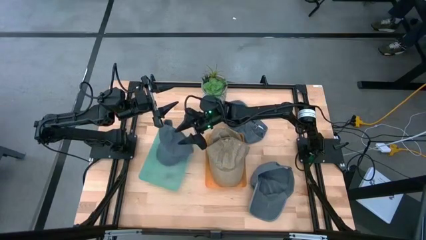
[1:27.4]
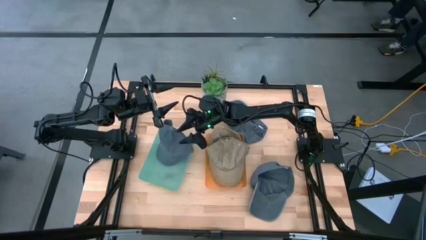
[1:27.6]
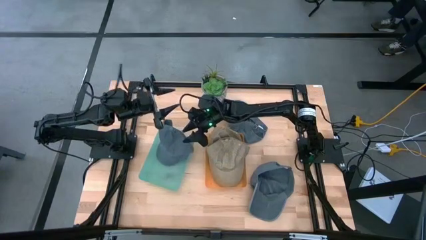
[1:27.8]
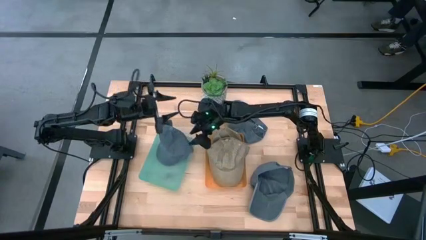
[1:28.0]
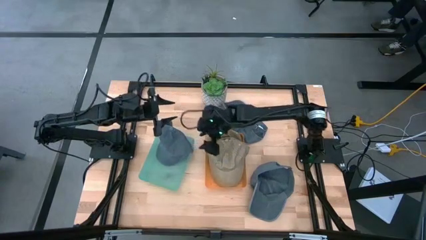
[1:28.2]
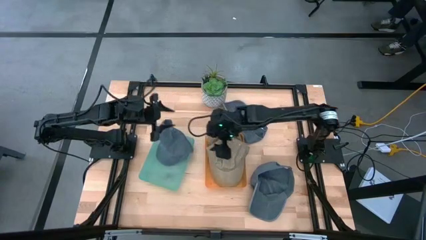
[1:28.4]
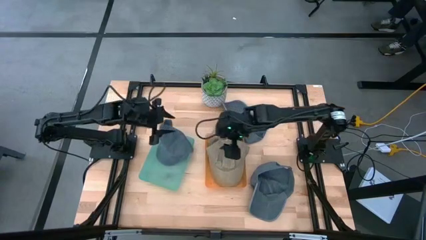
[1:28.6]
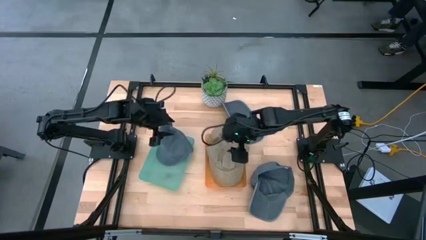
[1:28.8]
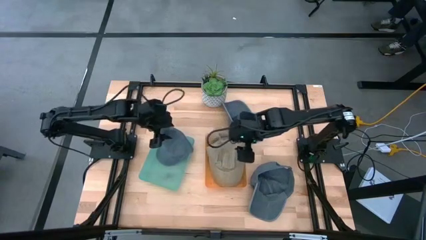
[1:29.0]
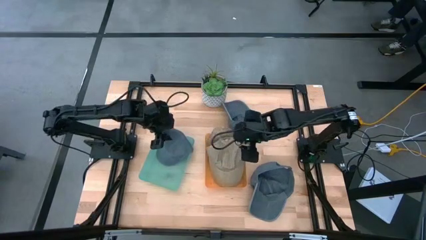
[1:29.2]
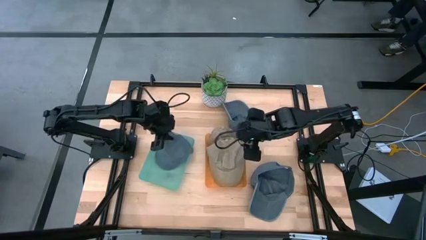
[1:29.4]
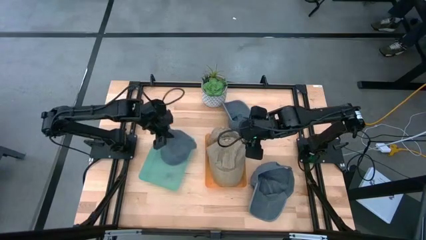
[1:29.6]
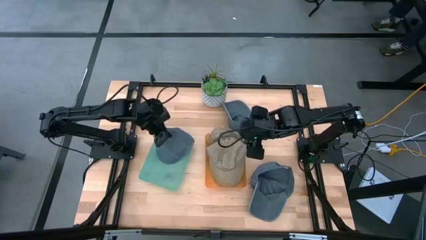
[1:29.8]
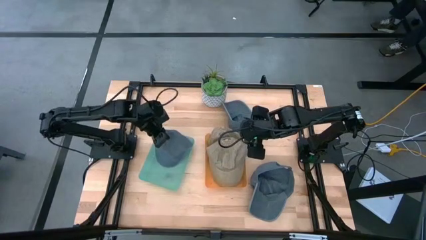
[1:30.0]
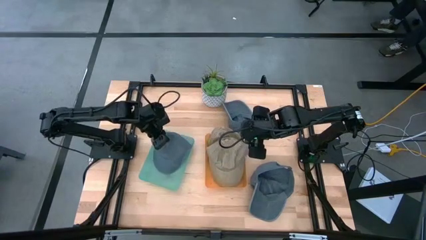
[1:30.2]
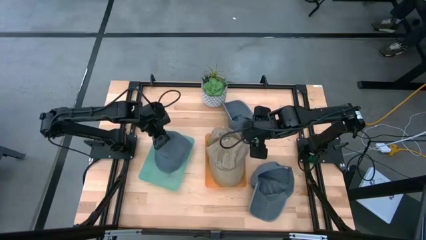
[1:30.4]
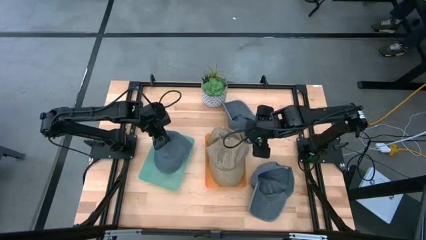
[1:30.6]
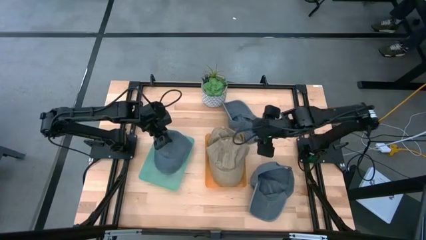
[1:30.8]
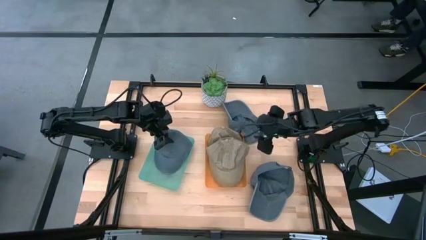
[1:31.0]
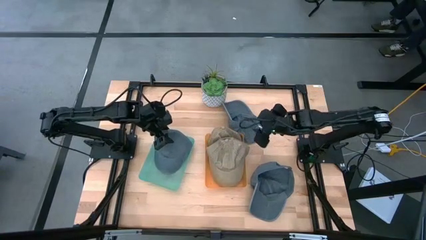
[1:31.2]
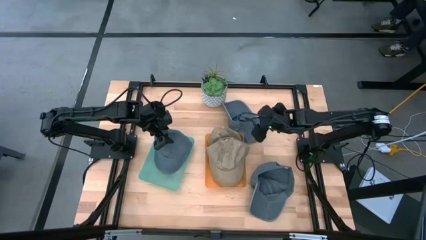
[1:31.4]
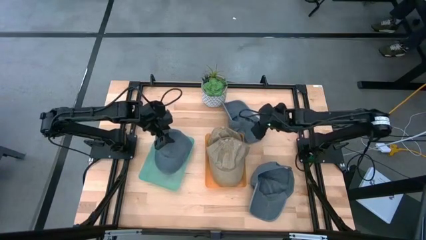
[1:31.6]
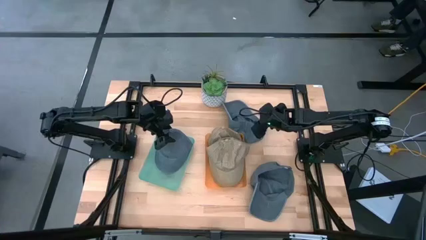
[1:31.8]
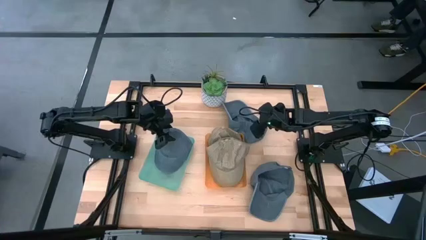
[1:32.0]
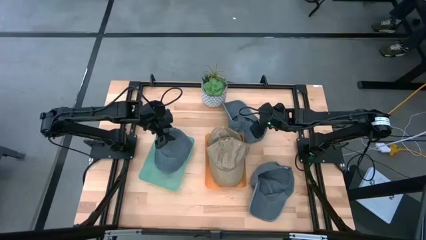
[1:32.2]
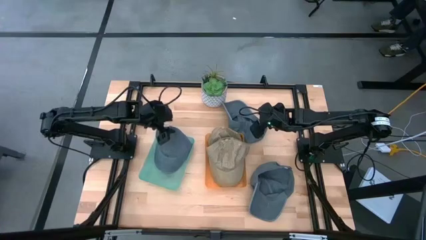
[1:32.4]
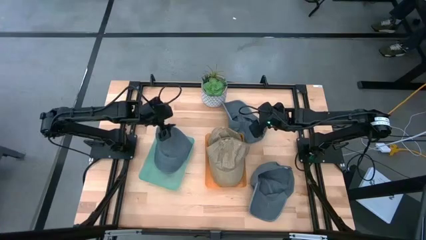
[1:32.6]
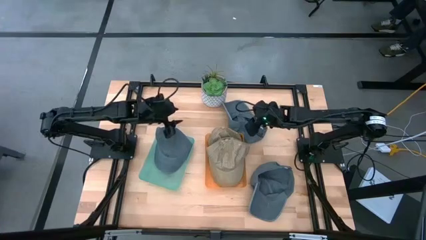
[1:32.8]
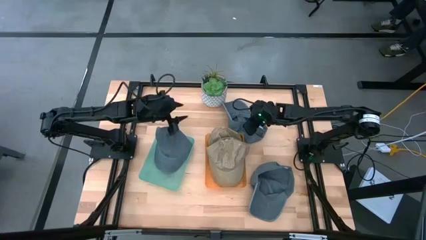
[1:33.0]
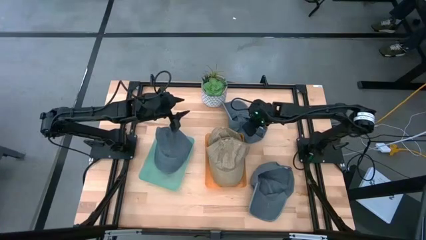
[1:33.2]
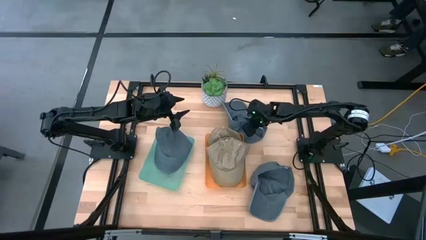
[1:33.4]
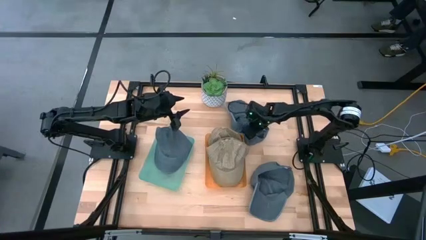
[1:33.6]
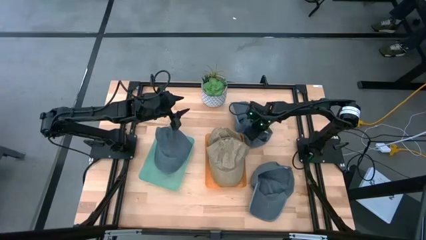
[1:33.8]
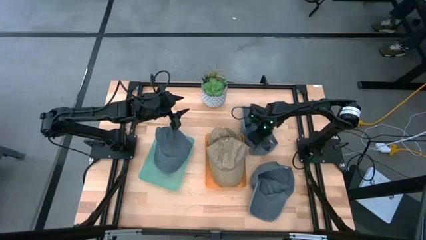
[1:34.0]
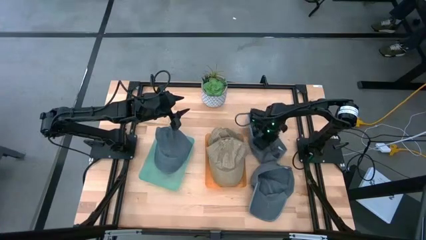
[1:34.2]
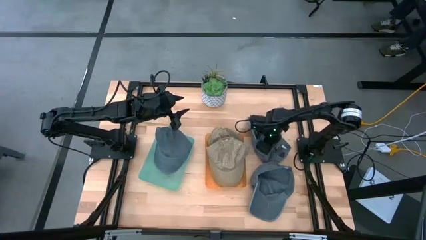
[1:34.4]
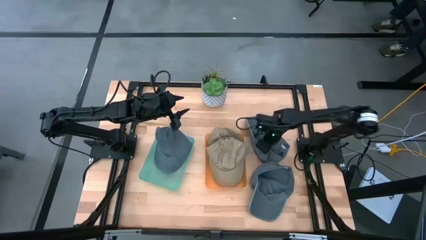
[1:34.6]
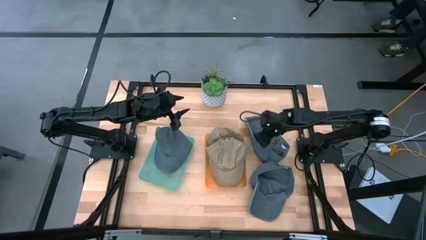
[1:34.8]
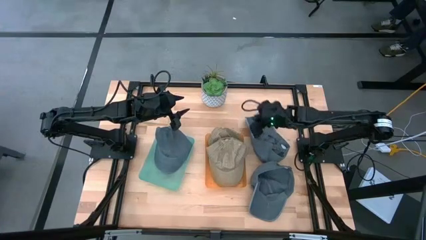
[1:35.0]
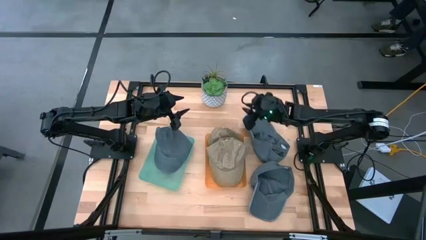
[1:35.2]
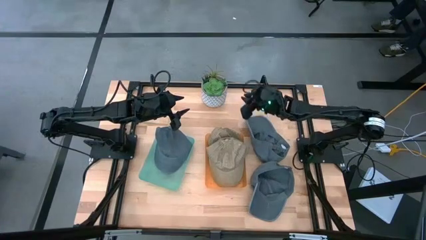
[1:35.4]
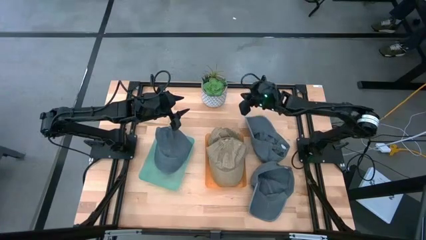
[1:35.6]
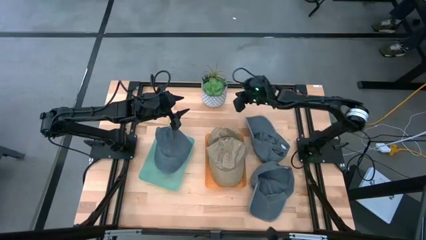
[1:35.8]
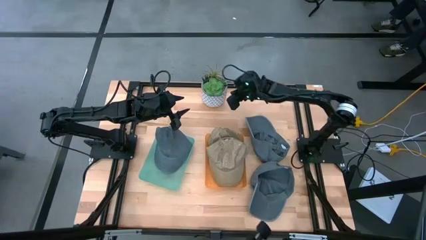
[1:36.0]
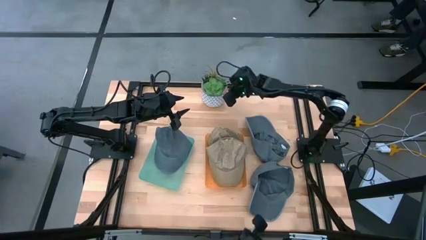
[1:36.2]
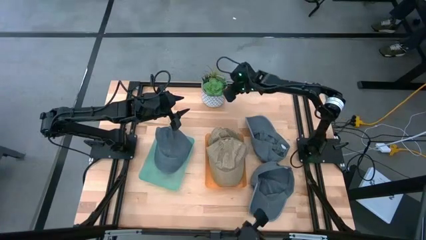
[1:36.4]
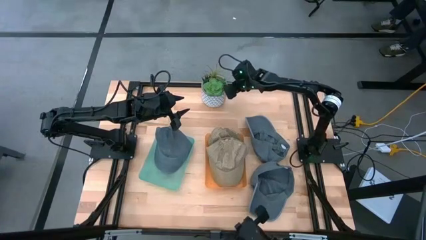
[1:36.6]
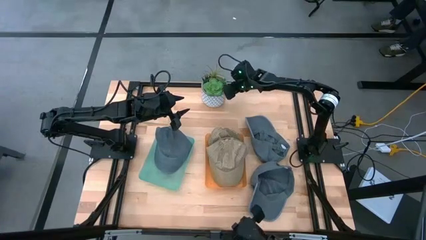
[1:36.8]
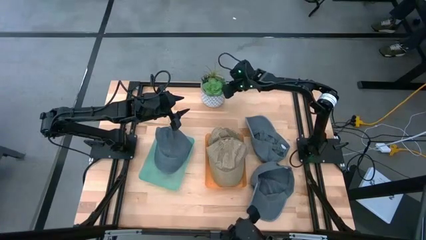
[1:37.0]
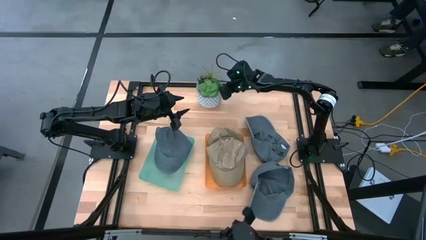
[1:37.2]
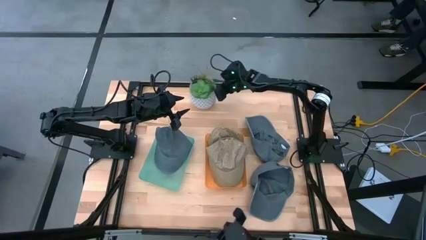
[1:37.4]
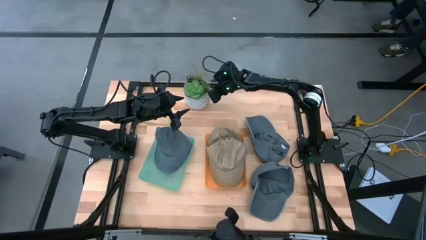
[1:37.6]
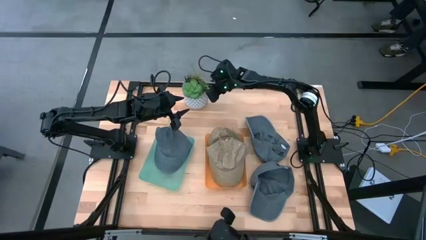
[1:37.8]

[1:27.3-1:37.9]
Task: Pick & Place hat
Adjust the vase on the table

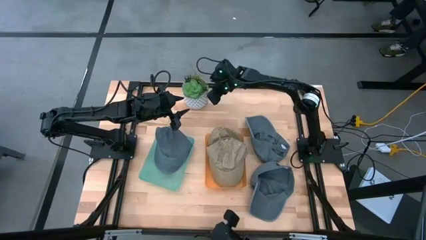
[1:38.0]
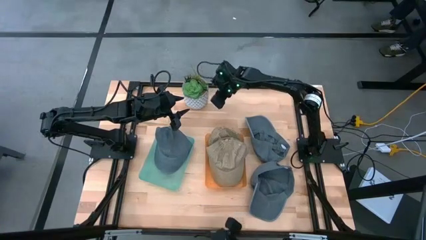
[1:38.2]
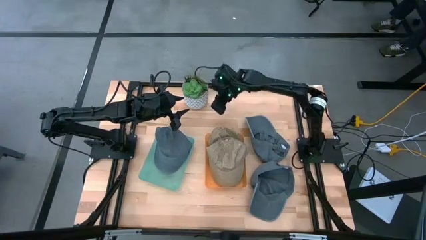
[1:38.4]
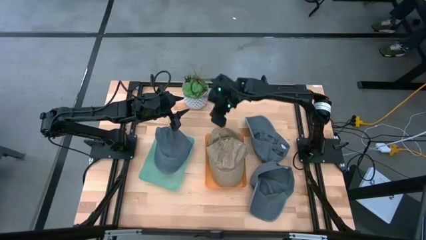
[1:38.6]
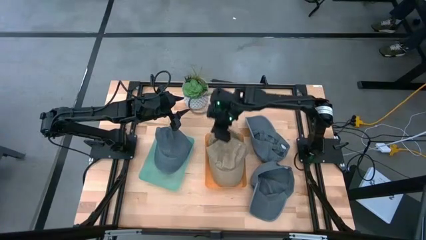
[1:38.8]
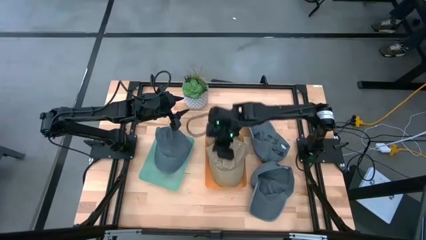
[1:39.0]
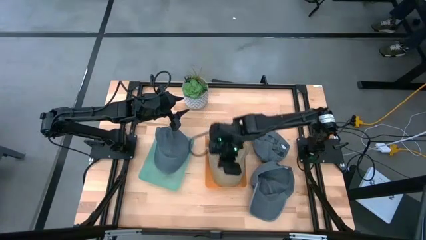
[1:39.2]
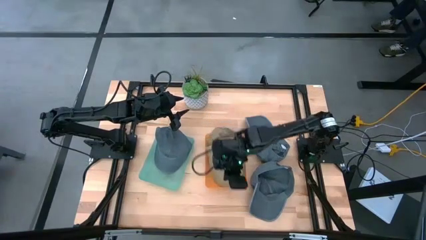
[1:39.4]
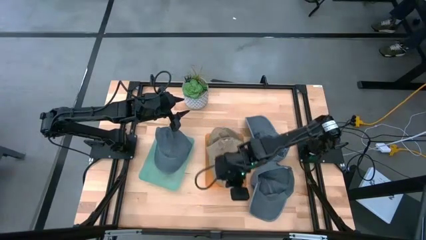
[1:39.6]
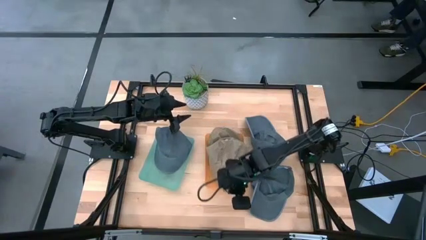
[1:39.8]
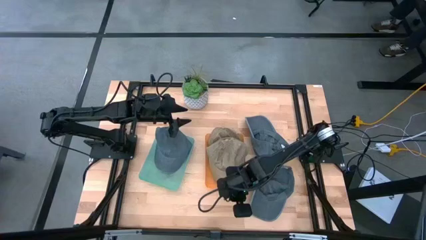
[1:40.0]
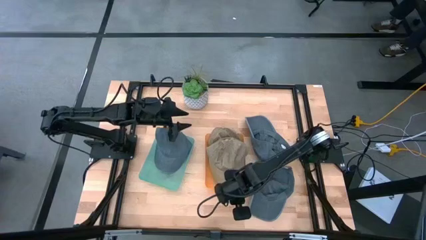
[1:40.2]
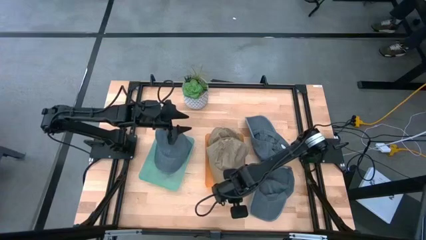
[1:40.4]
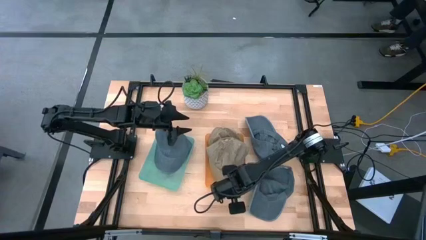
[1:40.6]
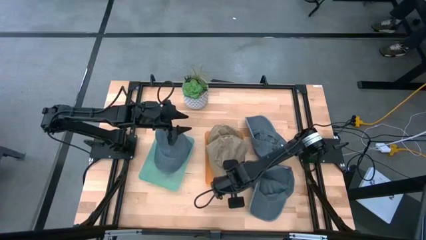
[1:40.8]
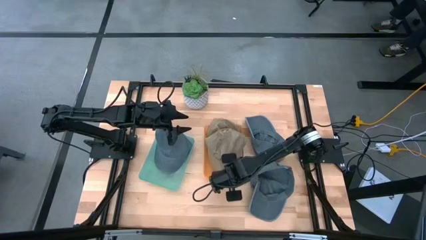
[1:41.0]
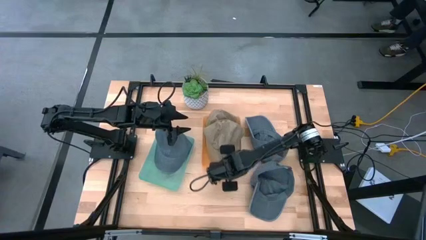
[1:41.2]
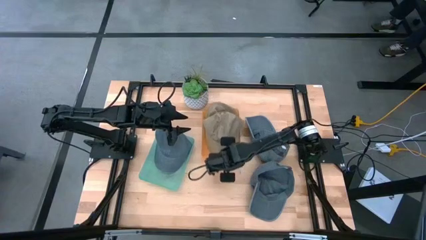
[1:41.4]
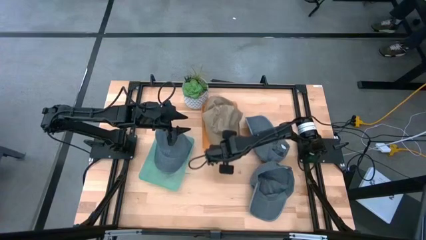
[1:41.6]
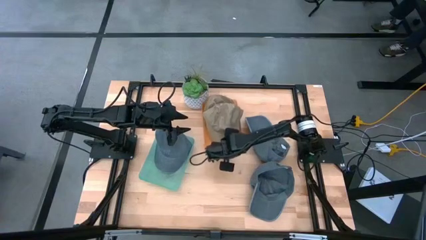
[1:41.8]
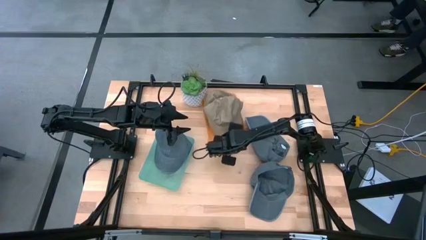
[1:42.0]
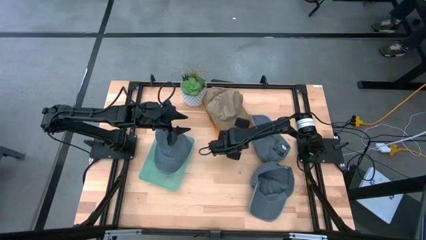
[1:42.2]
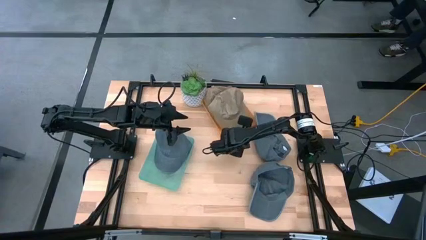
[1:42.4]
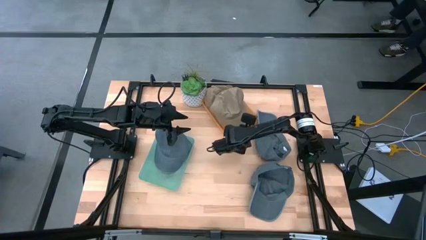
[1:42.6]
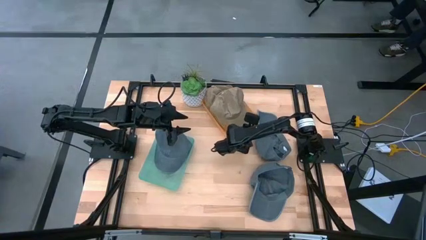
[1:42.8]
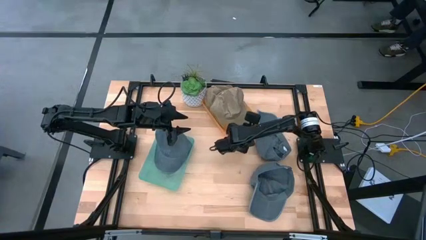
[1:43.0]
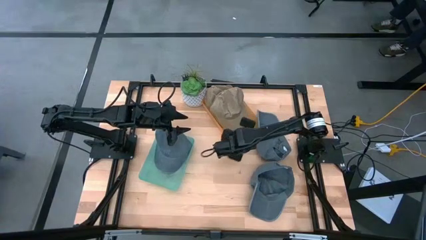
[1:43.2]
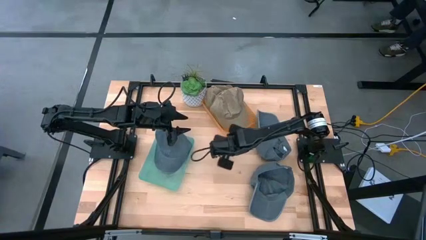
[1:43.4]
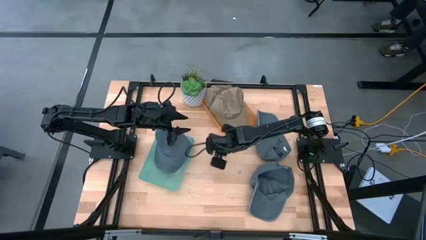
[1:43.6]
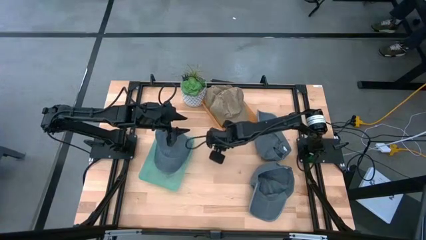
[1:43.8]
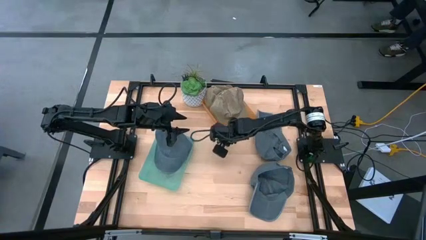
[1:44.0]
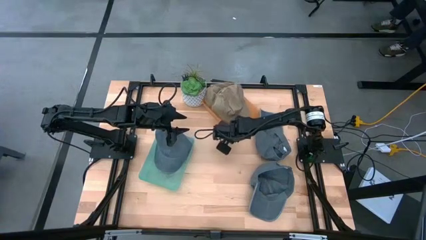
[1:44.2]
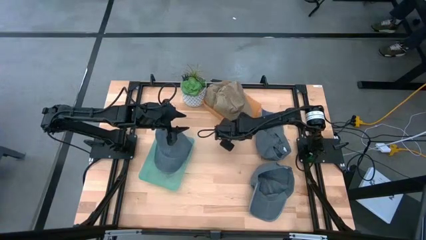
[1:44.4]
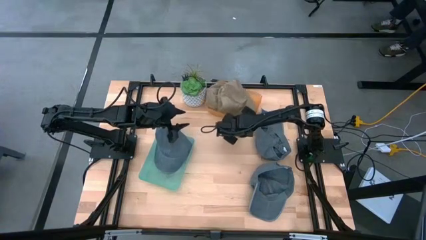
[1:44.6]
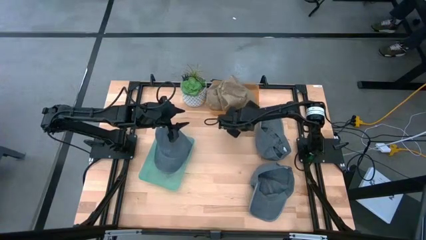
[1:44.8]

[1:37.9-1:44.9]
Adjust the orange bin on the top of the table
